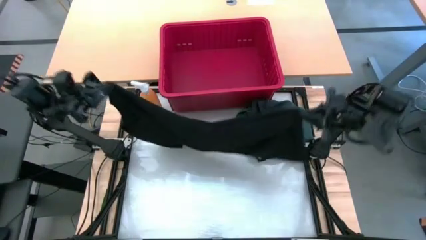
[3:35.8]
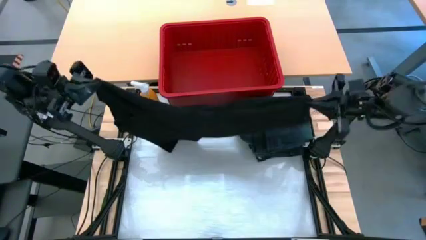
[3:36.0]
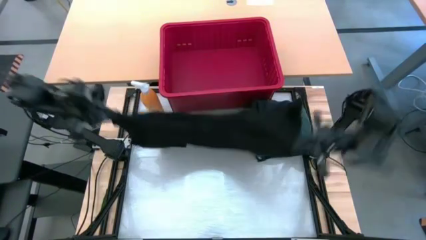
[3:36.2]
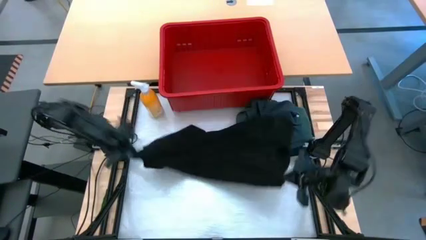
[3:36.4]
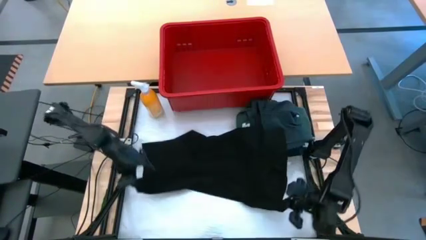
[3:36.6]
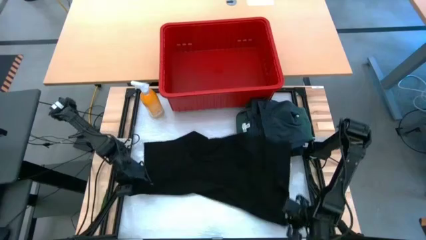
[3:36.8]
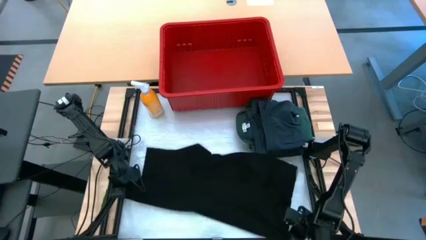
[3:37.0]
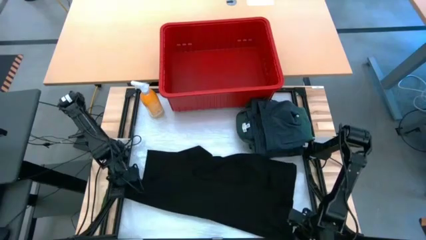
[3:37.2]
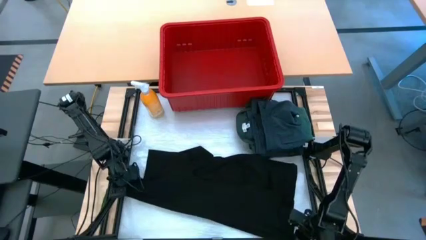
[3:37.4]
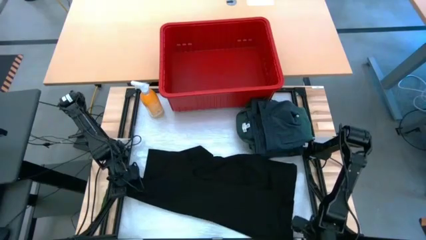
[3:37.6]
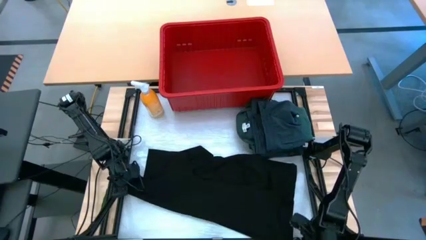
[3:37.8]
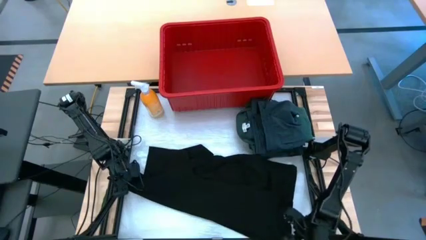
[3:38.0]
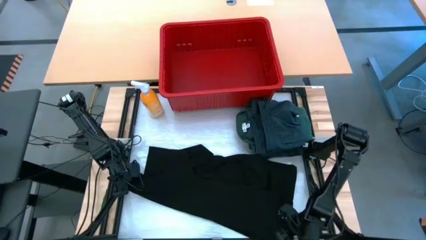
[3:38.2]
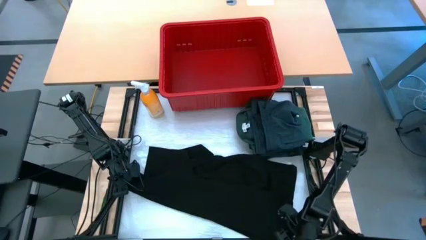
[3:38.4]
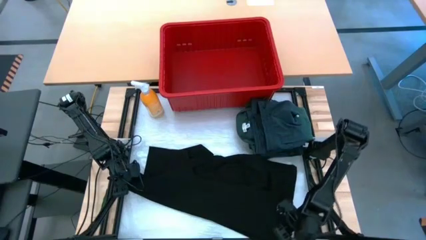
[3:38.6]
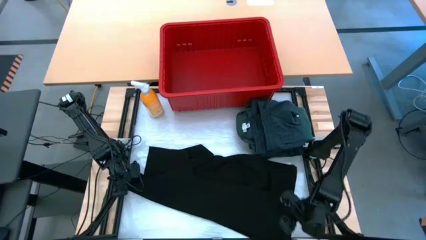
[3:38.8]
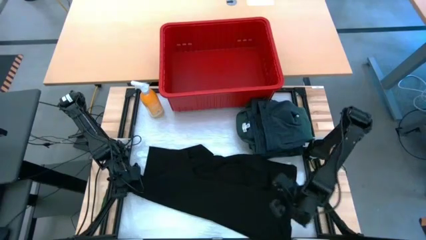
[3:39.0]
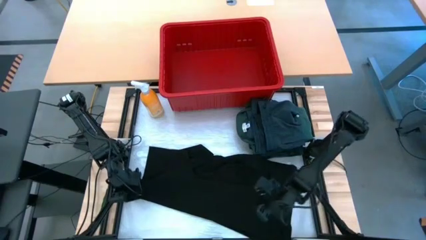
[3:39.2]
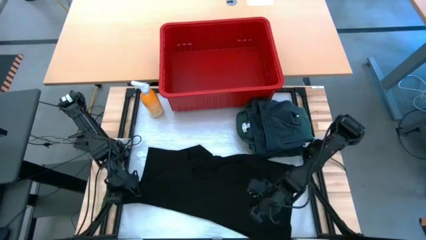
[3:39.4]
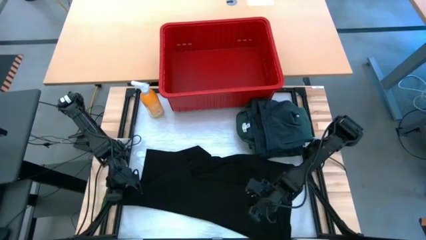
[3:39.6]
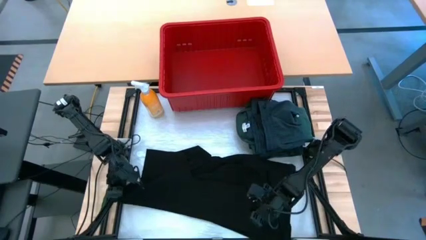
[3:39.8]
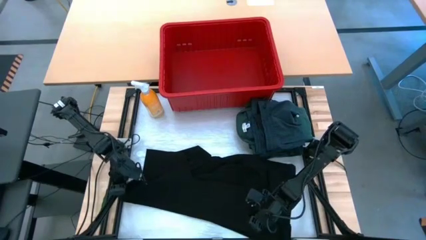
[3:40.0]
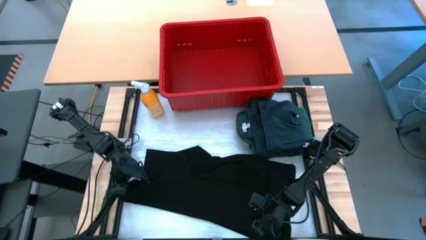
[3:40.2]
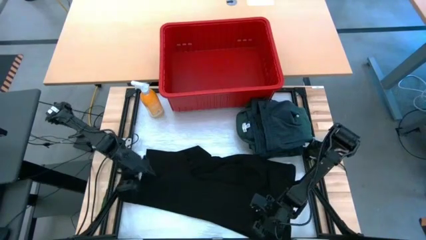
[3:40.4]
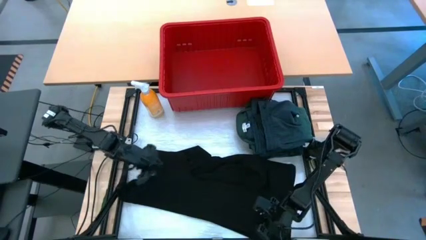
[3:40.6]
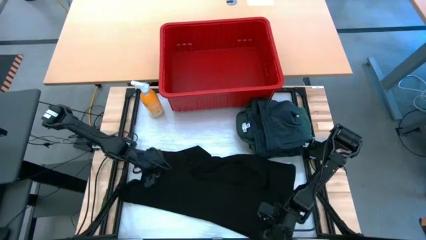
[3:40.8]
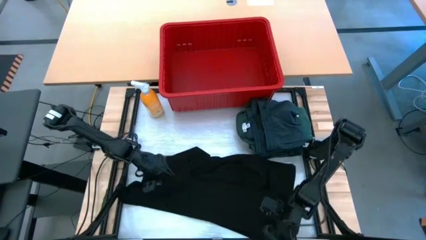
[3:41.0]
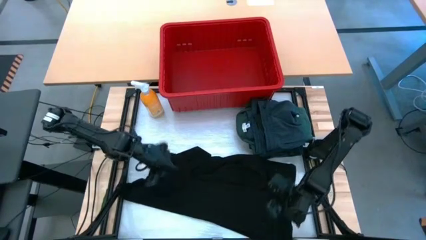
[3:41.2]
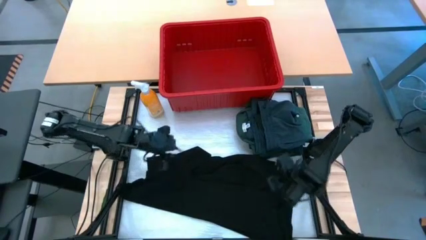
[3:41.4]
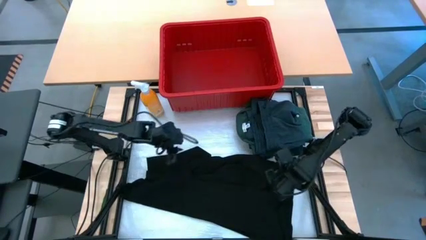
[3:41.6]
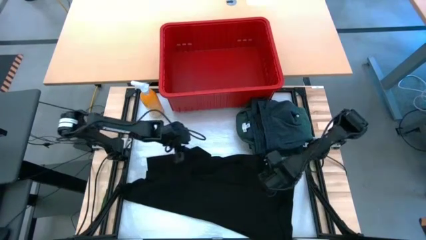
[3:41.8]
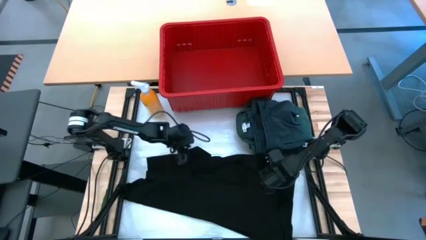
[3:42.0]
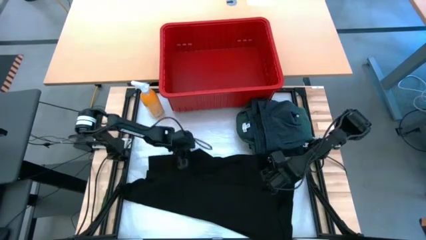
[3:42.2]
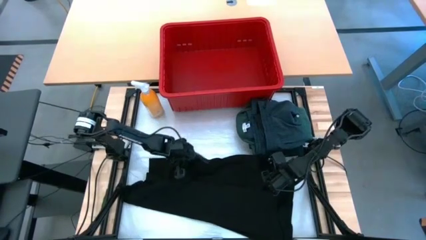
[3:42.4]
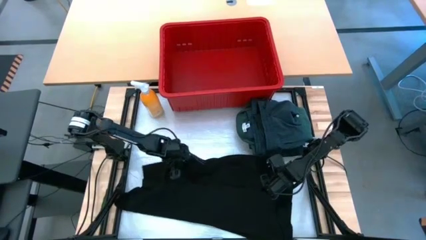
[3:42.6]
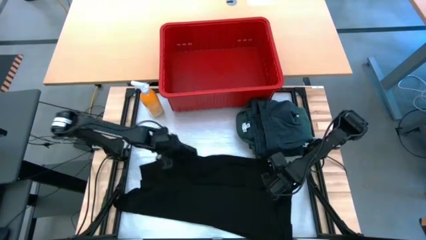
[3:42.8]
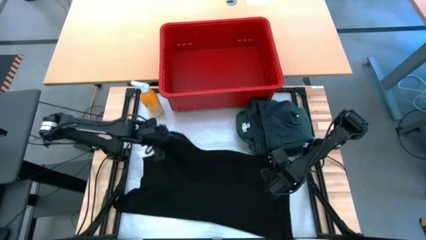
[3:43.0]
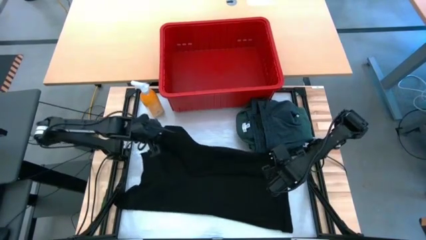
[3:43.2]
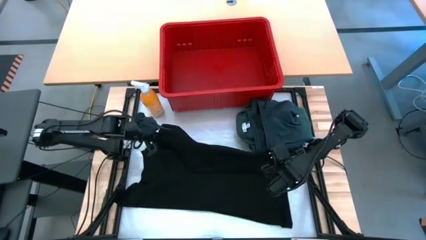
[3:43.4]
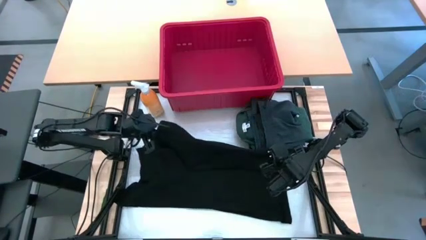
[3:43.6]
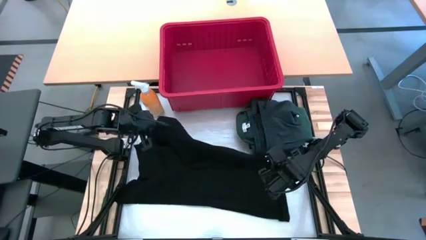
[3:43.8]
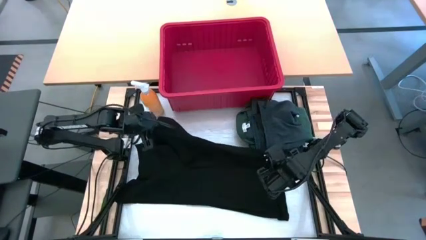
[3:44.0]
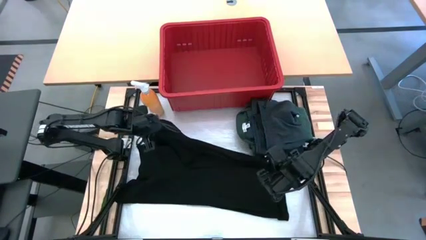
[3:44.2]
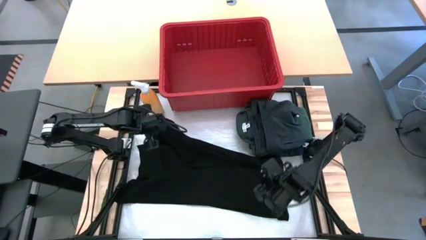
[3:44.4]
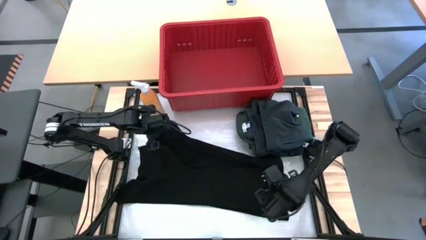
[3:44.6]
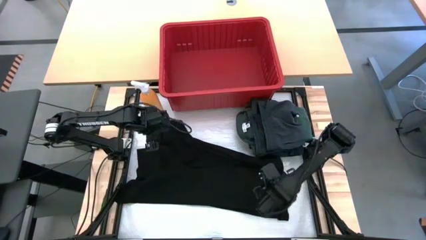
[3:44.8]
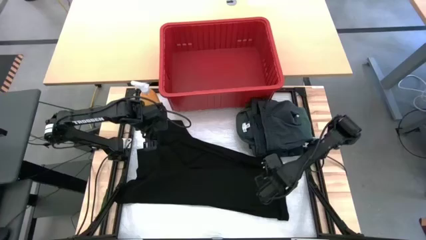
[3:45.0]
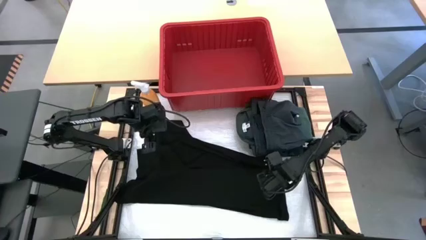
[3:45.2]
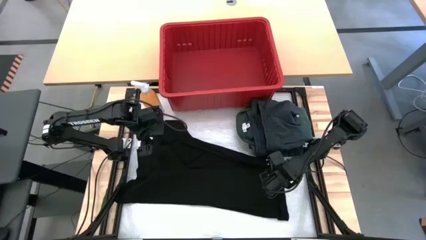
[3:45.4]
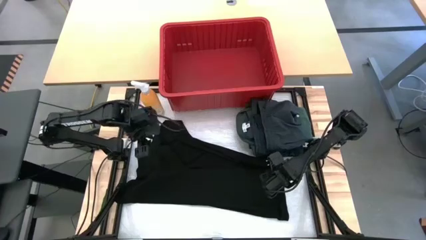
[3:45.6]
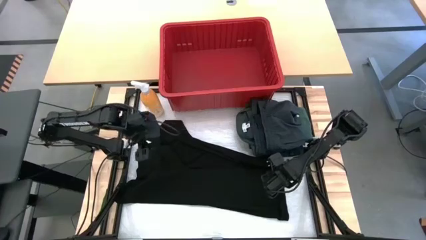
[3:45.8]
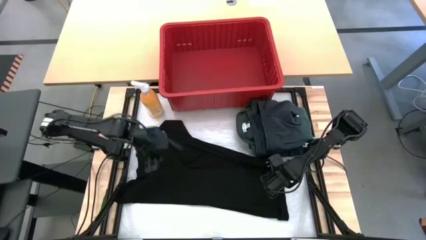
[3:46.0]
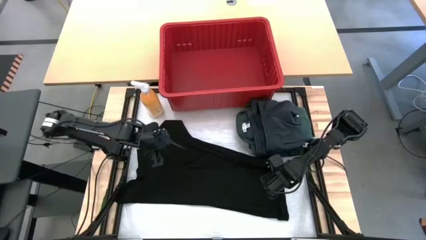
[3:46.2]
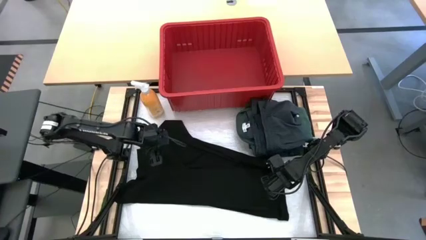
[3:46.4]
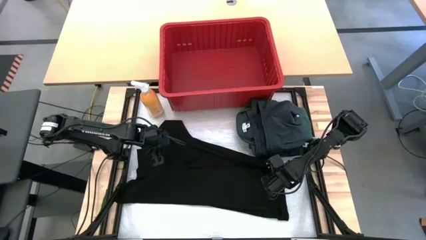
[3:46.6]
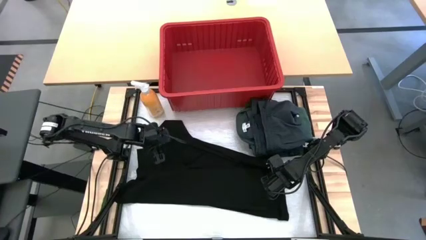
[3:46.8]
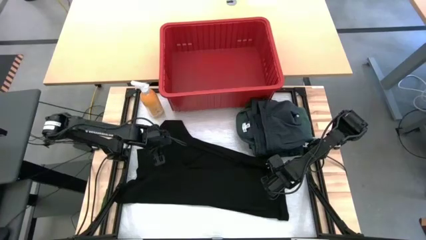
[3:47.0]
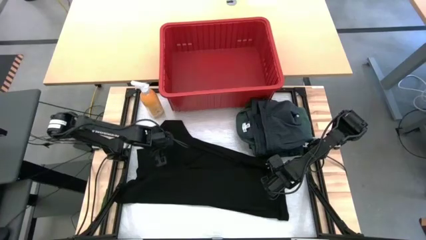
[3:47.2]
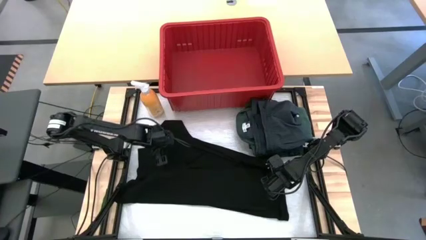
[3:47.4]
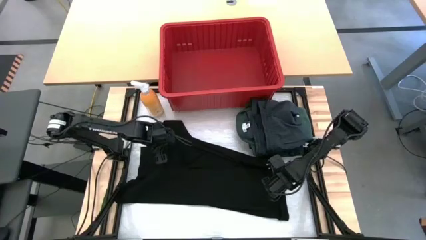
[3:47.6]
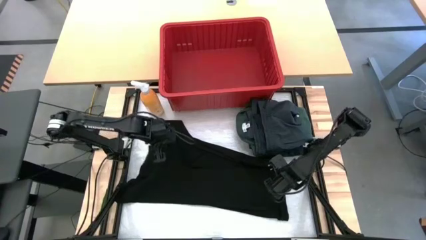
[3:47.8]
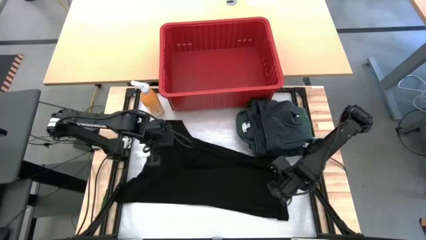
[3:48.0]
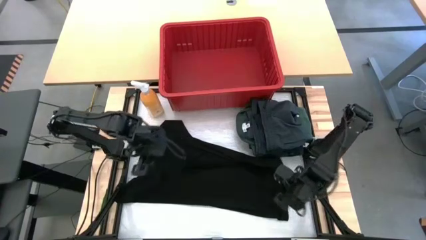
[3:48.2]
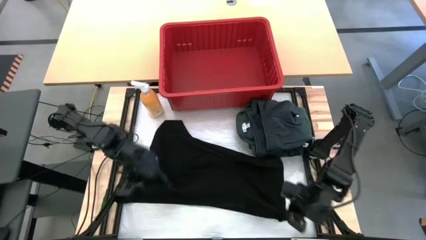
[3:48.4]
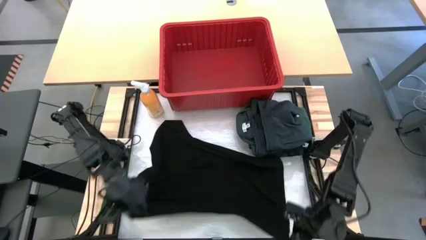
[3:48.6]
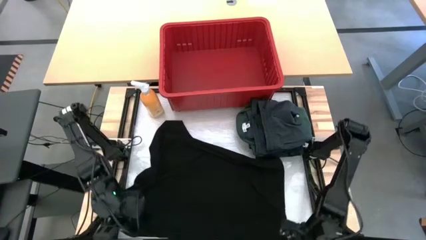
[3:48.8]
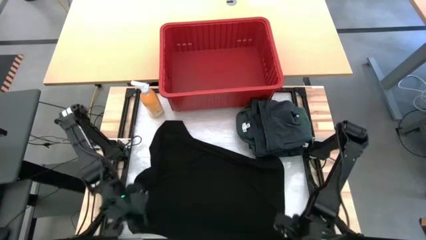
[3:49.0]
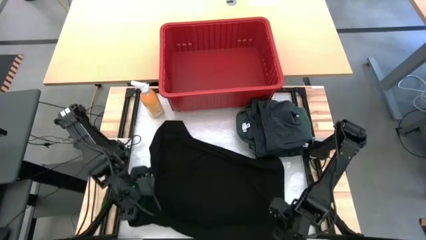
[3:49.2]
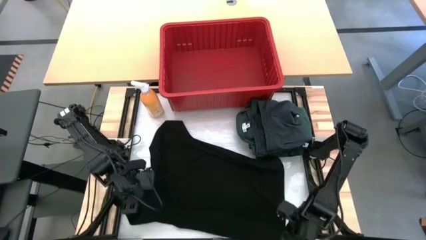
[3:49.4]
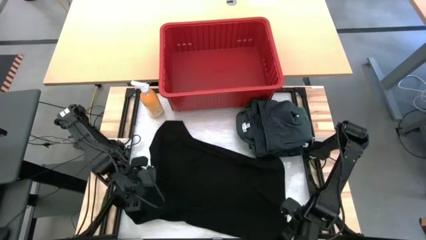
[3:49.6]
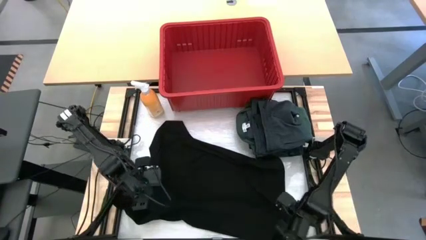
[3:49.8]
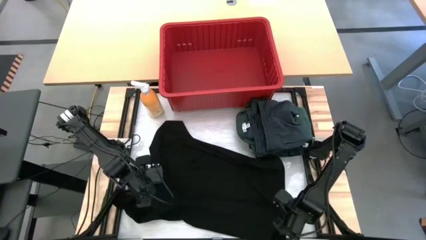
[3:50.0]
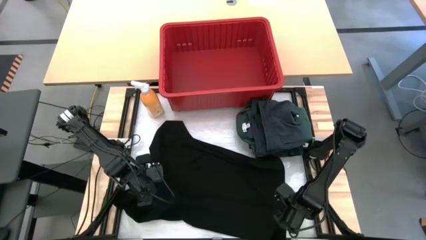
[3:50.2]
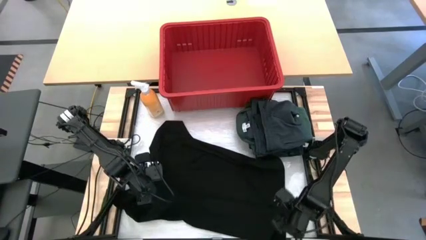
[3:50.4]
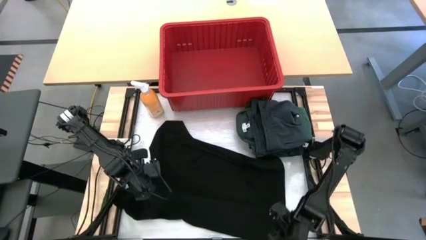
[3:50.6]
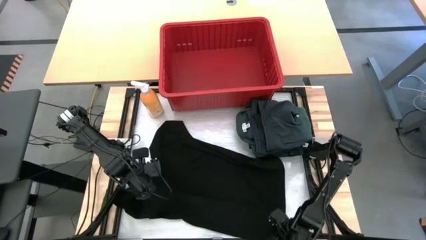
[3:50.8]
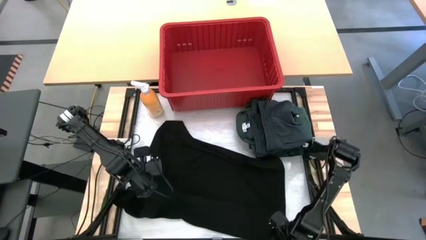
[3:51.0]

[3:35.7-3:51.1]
Task: Fold Laundry from Bin
Fold the black shirt

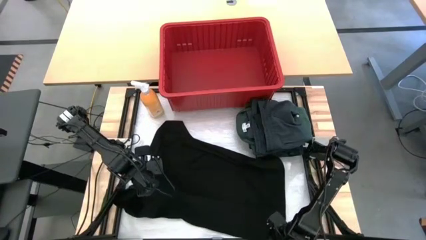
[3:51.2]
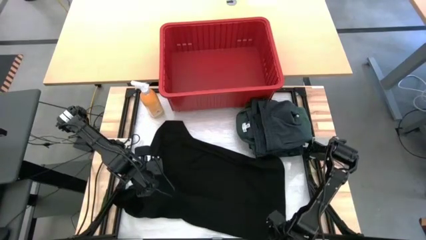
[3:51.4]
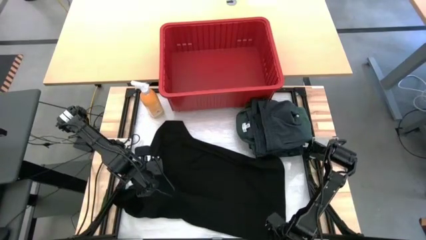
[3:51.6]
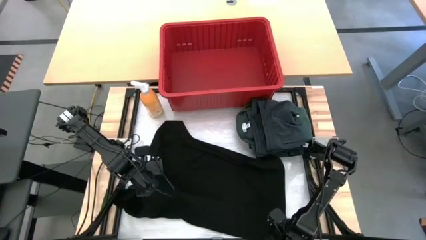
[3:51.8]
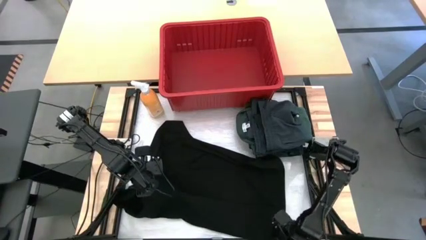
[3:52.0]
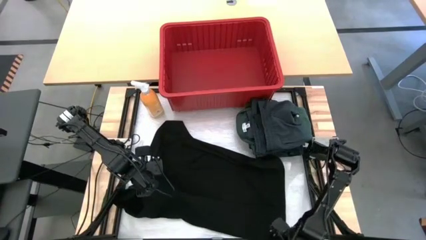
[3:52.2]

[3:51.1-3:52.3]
Fold the black shirt
